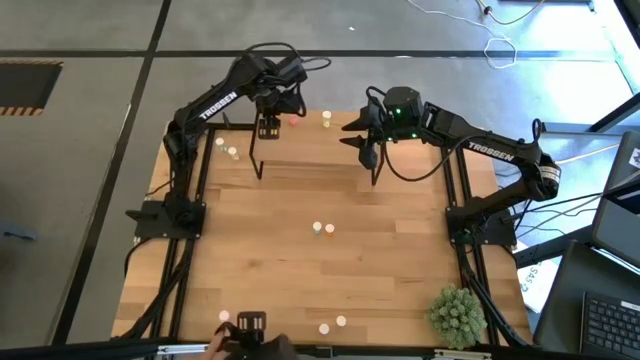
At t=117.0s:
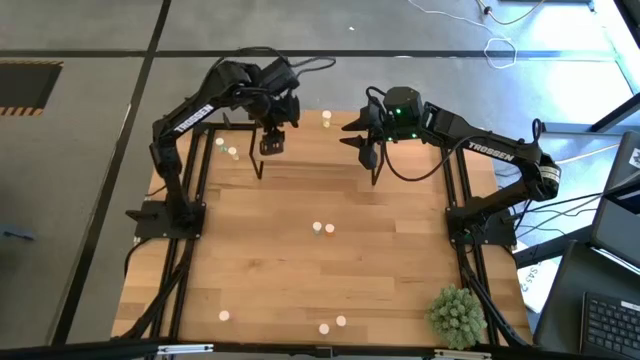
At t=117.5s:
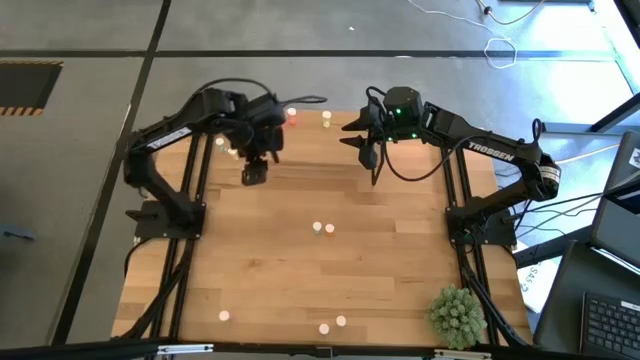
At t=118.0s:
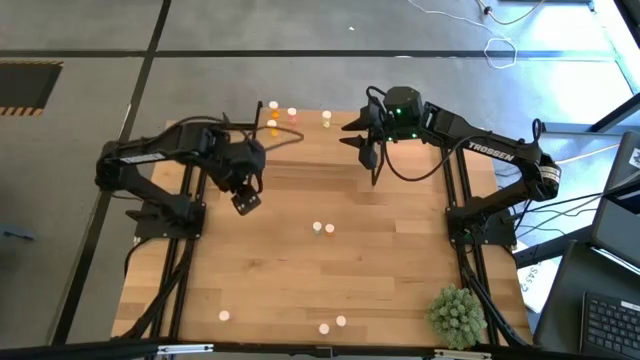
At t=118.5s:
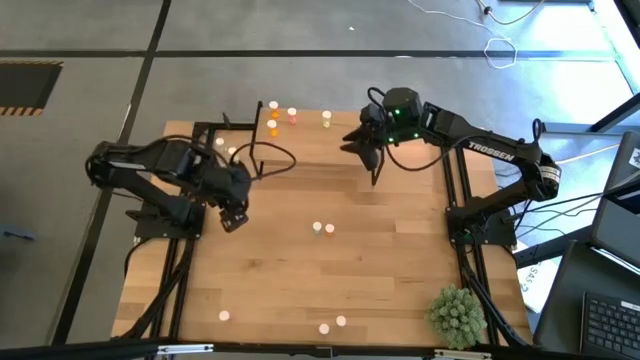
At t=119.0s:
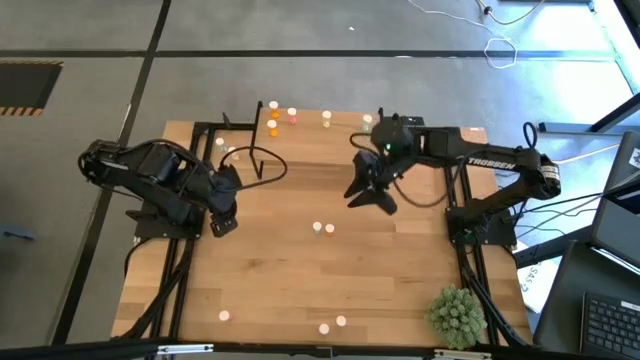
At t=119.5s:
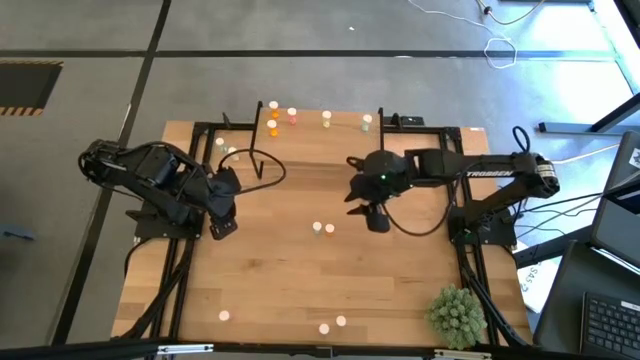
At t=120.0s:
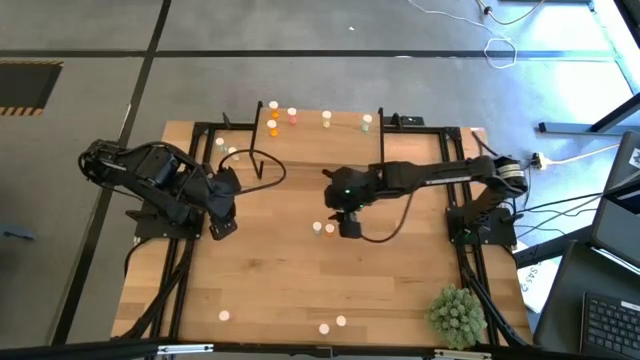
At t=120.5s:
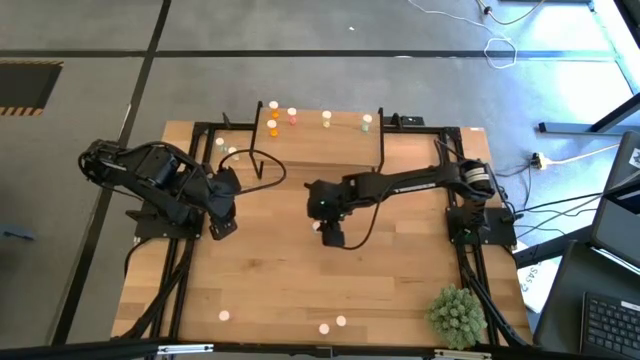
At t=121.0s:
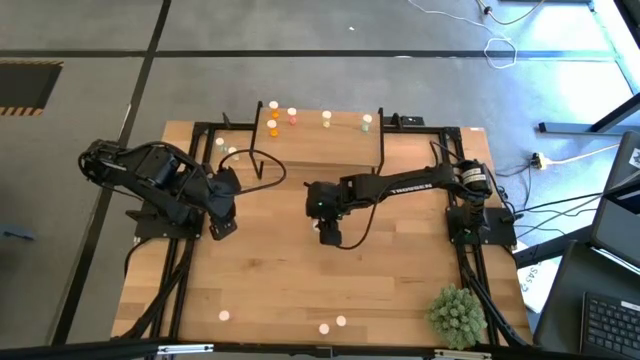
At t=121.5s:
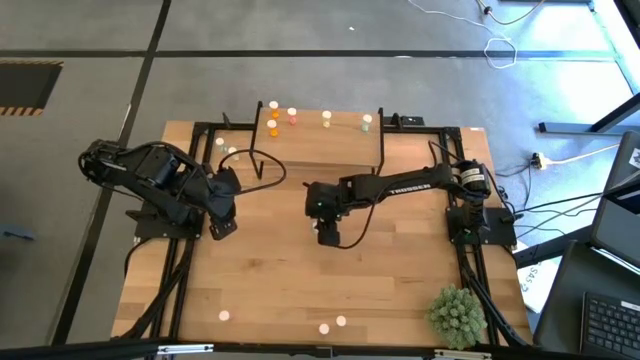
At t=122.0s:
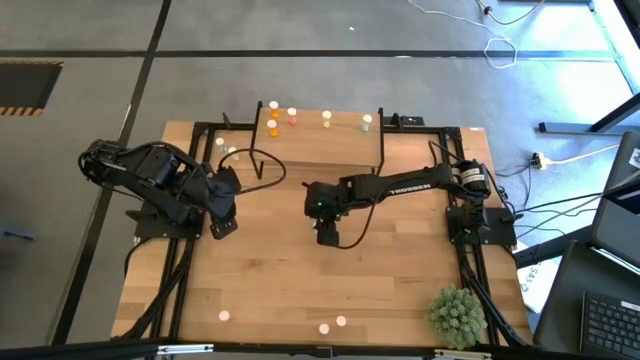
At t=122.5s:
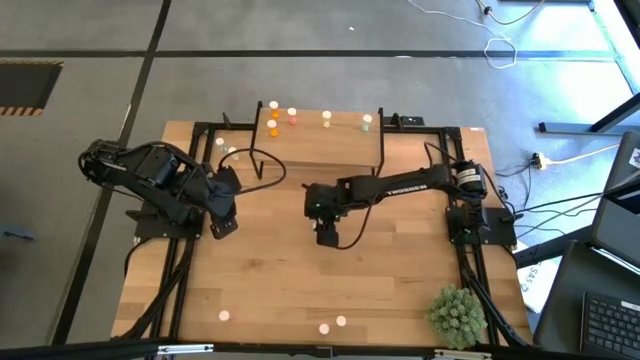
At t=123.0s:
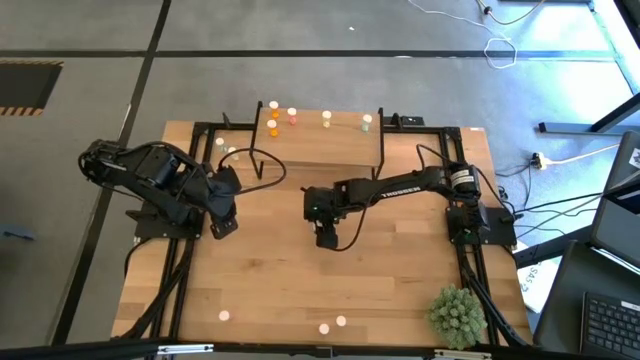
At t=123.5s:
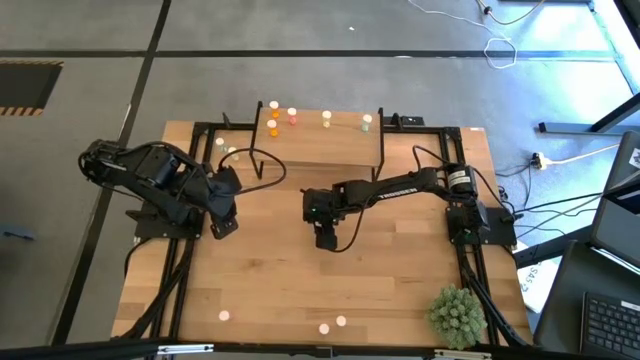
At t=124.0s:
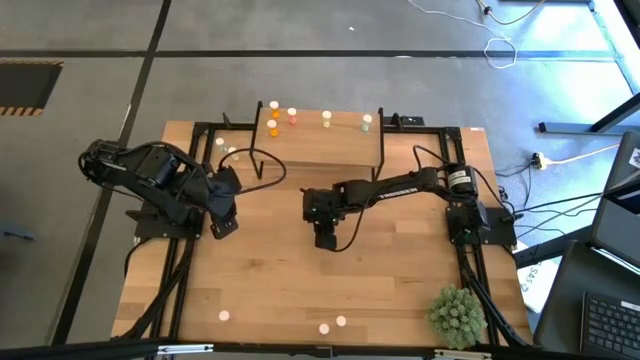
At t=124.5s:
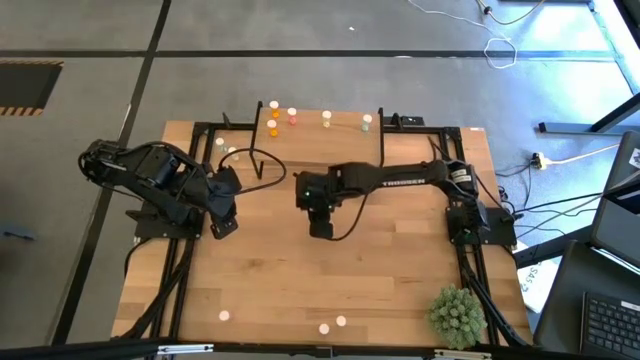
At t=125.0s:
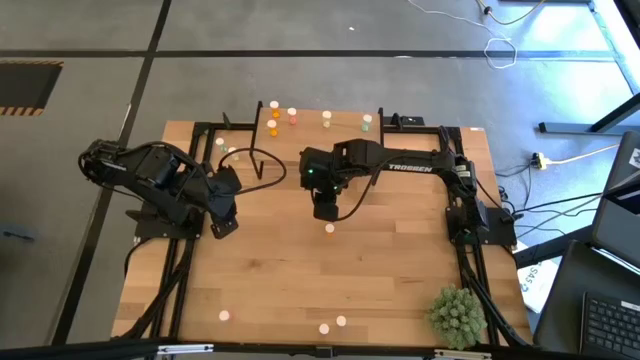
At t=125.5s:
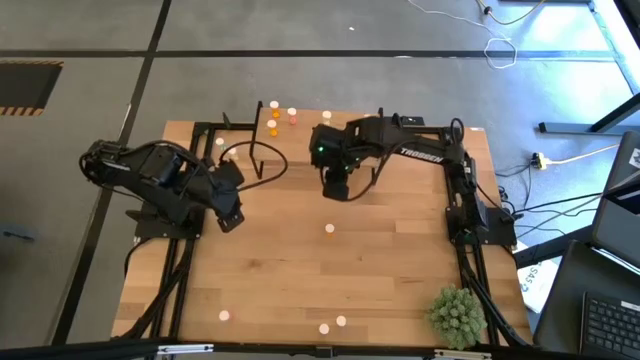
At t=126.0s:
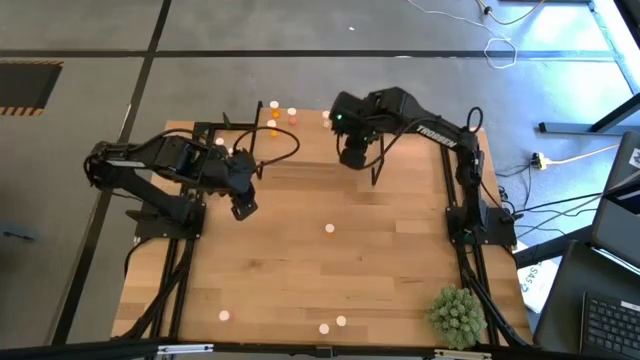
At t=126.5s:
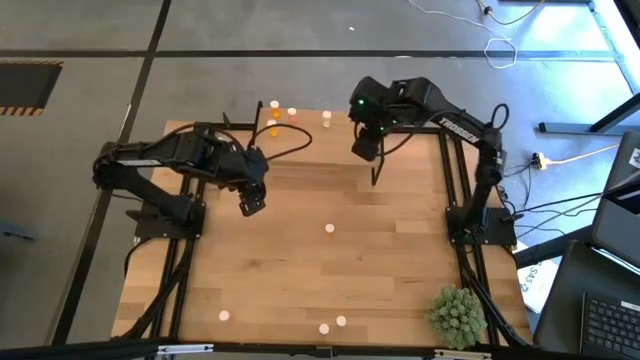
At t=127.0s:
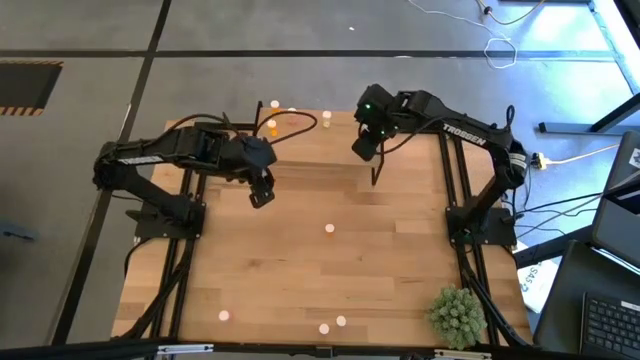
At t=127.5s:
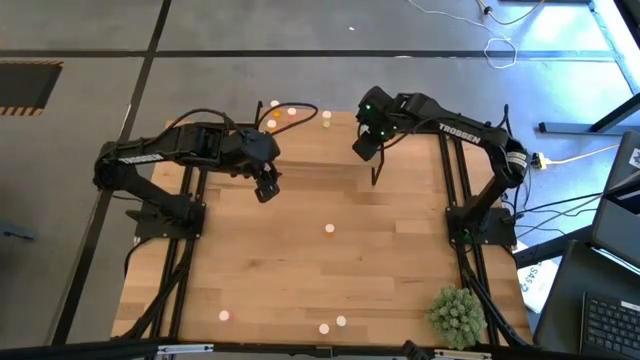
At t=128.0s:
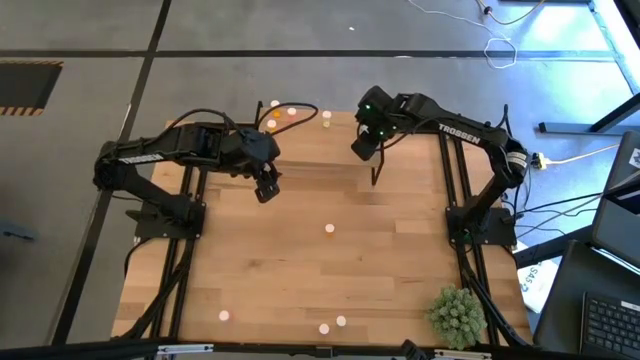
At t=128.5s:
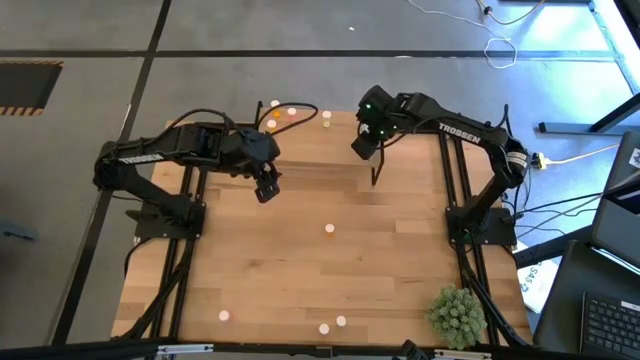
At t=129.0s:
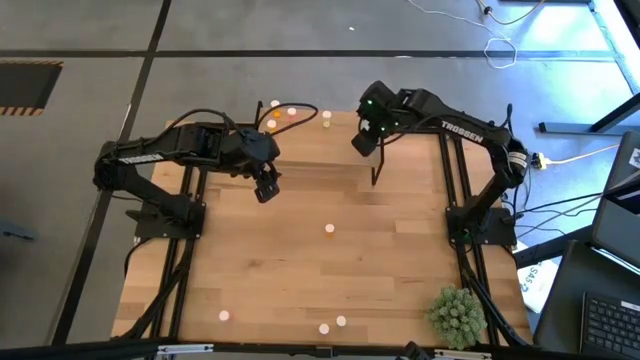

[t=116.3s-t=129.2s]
Task: Pick and place medicine bottles onto shelf by color
Put the bottom blue pill bottle on the shelf aligned with the other blue pill bottle

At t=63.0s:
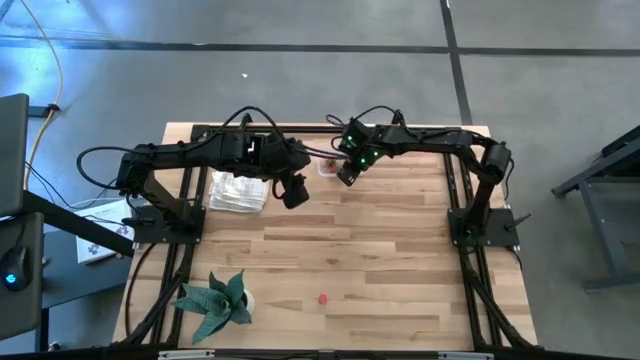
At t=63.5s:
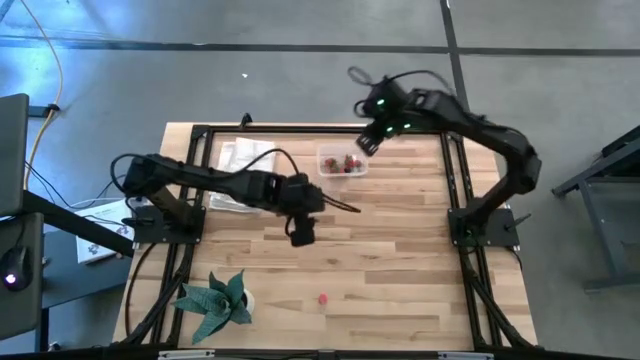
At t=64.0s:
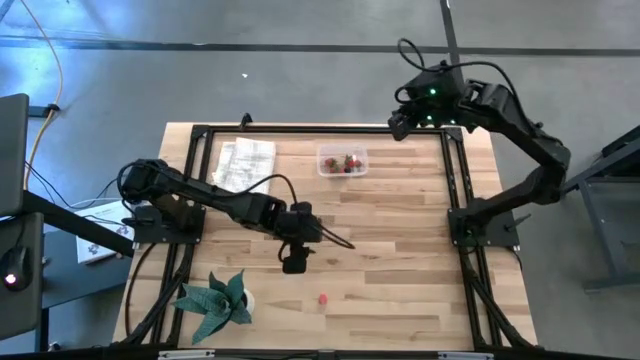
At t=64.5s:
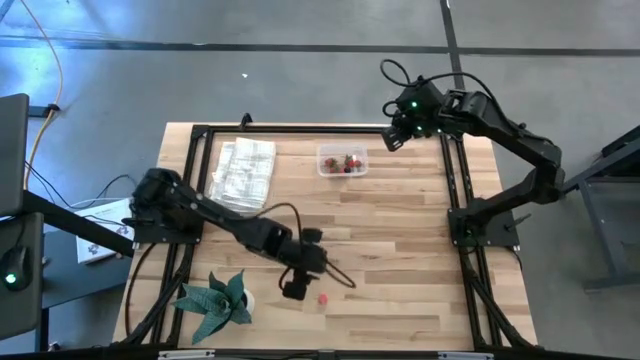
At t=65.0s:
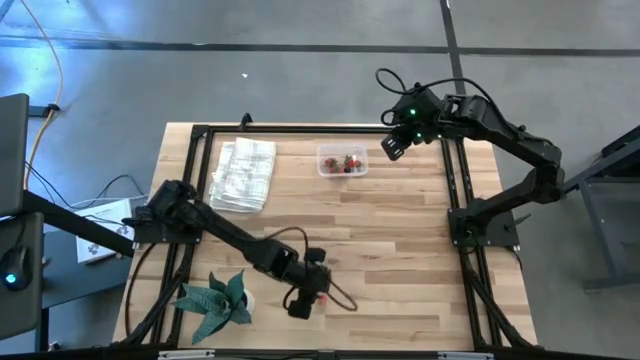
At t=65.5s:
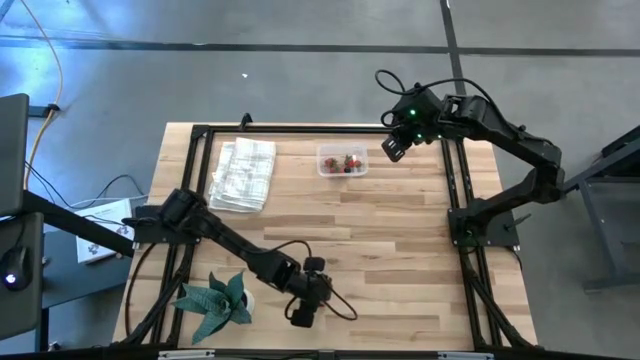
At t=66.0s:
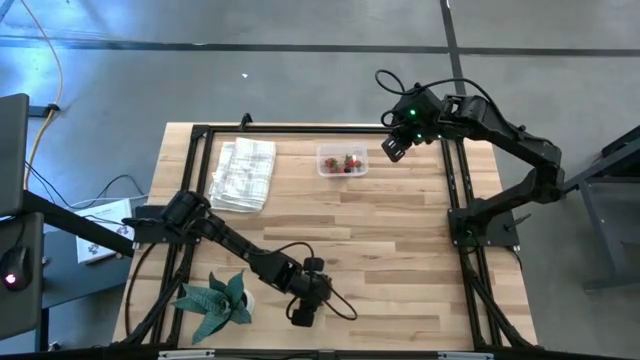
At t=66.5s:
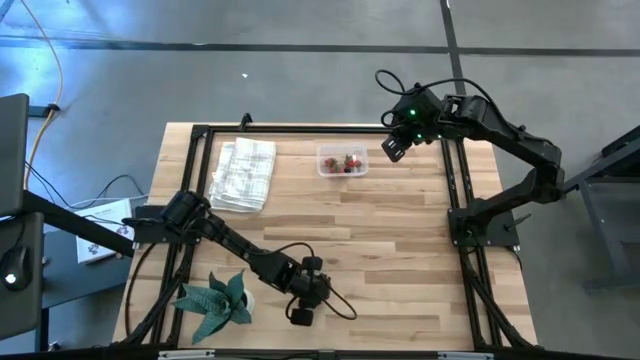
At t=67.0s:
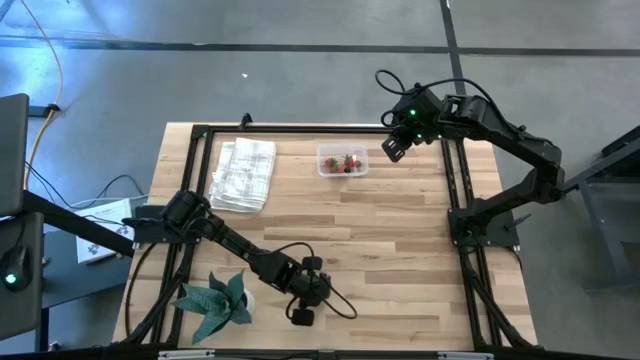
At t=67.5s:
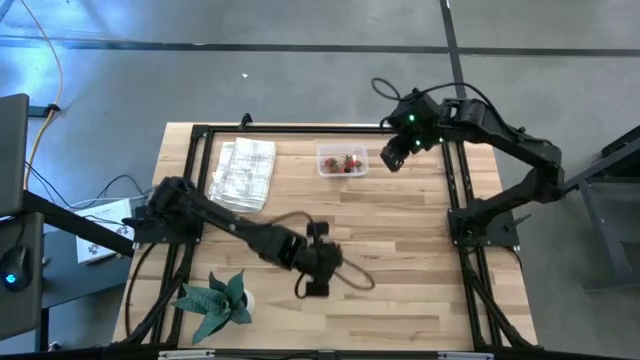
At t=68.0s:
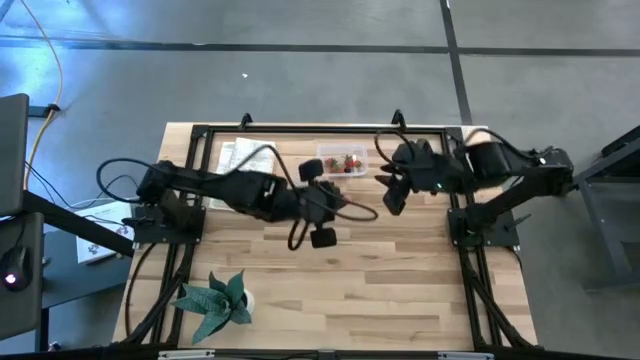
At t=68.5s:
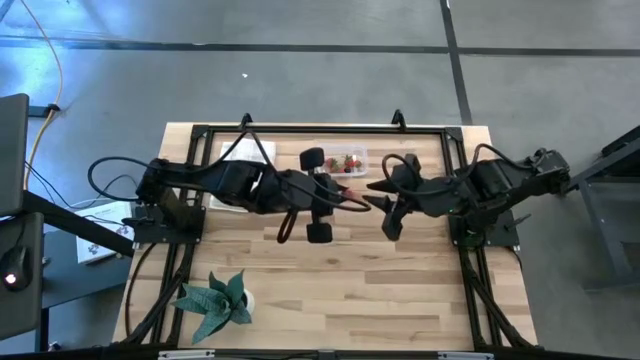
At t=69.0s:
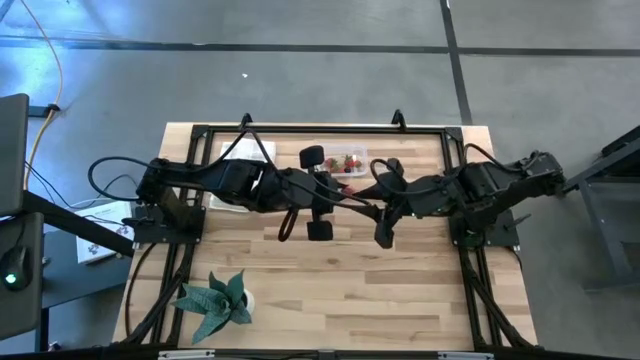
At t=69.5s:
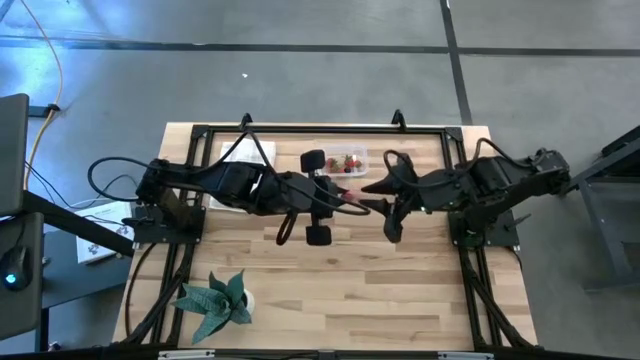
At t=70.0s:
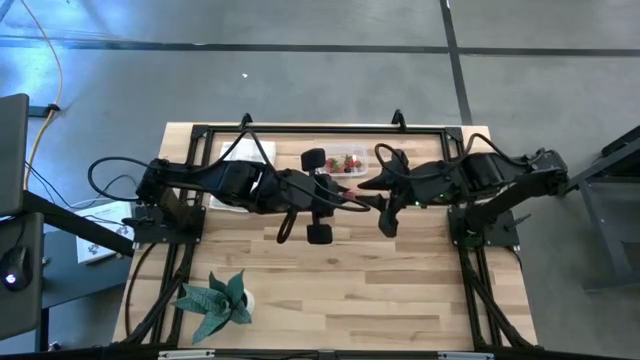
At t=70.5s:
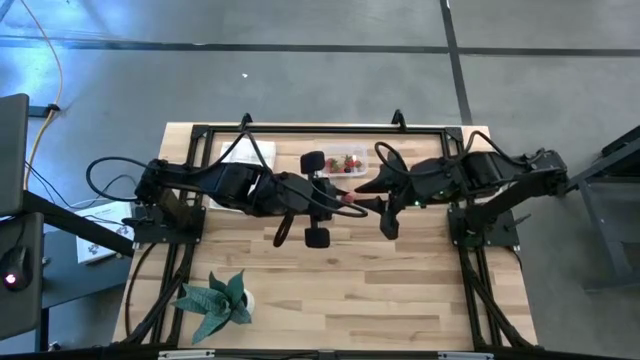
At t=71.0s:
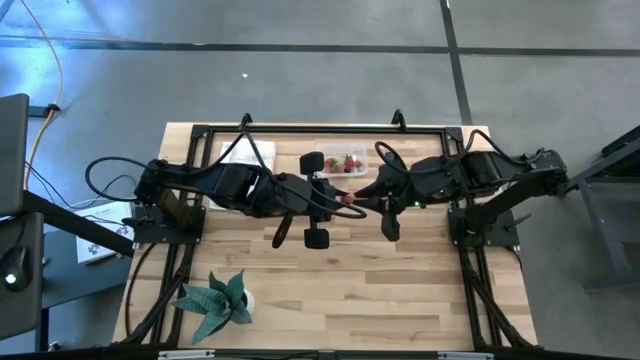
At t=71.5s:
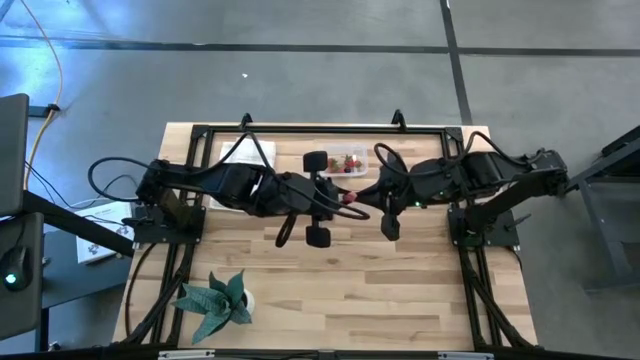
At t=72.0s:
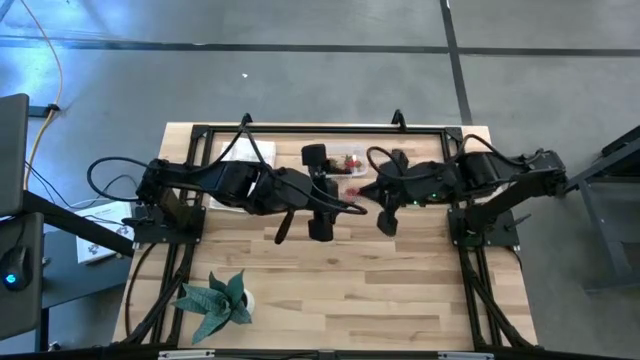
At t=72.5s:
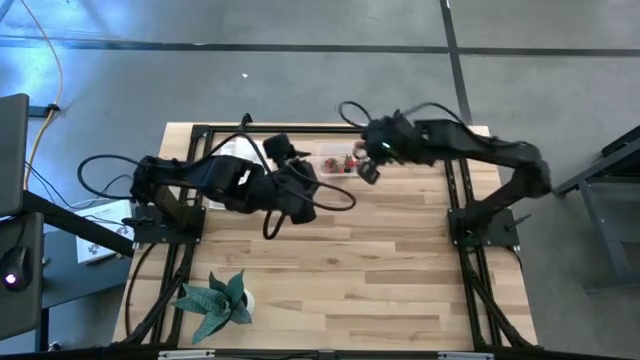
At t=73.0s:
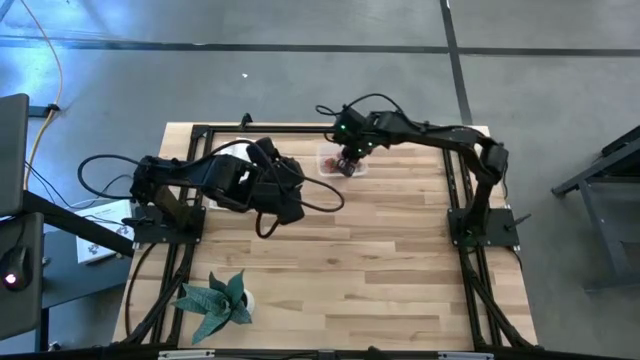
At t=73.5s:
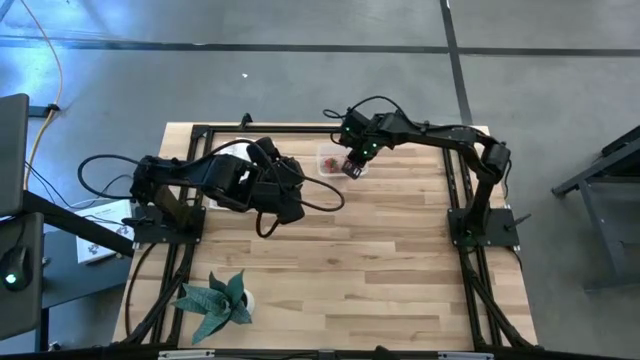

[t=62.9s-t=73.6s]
Task: Pick and placing Produce into tupperware
Put the pink apricot into the transparent container
